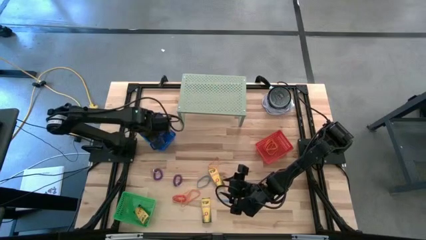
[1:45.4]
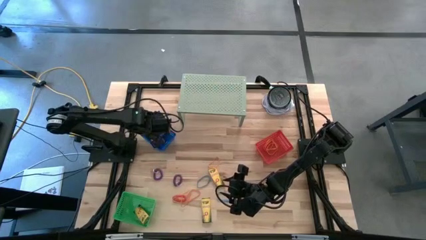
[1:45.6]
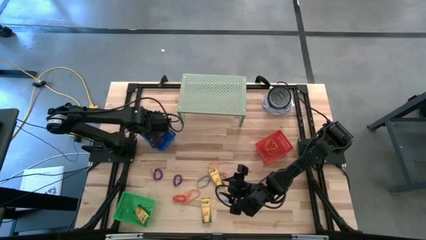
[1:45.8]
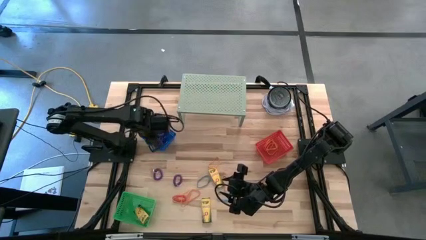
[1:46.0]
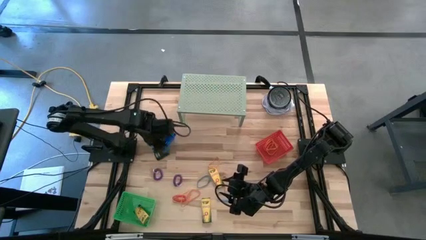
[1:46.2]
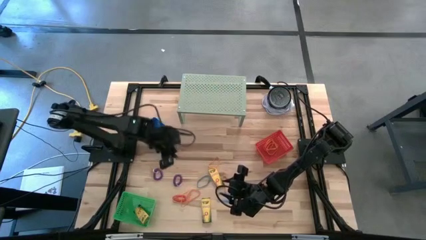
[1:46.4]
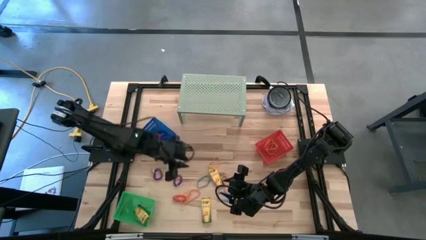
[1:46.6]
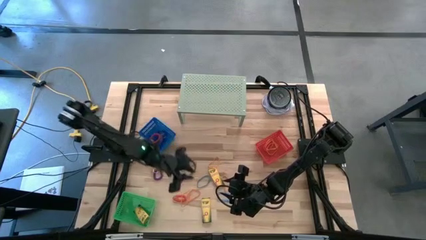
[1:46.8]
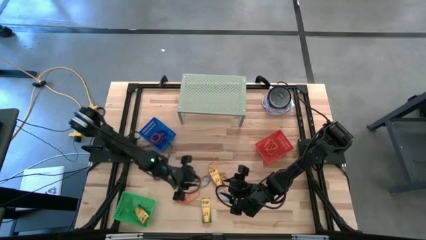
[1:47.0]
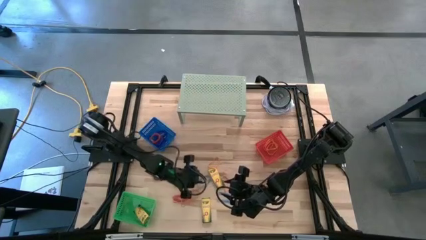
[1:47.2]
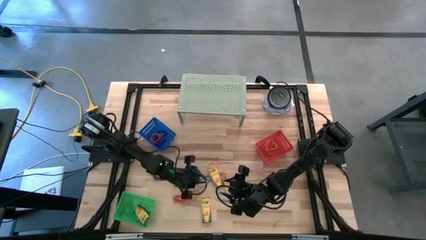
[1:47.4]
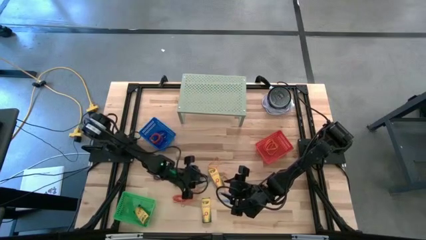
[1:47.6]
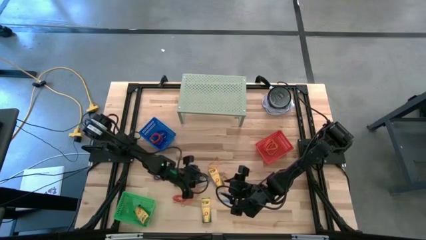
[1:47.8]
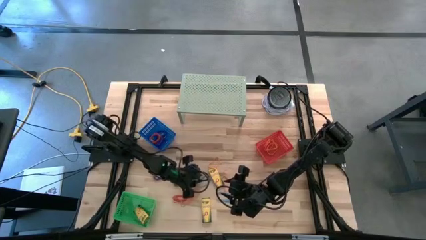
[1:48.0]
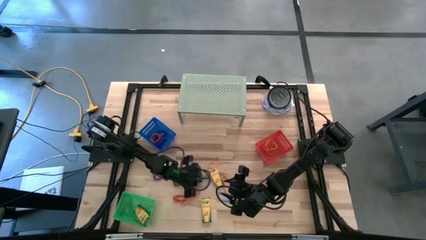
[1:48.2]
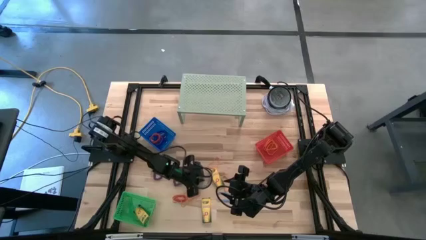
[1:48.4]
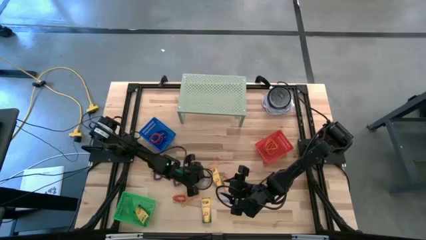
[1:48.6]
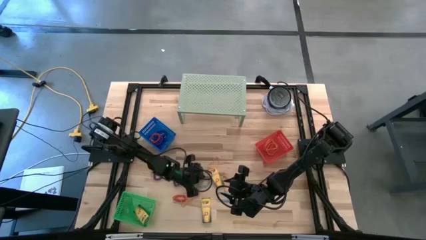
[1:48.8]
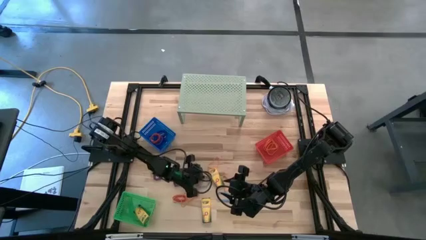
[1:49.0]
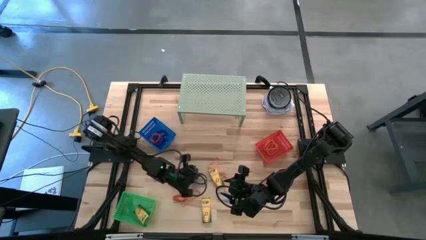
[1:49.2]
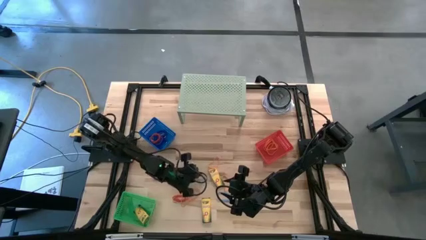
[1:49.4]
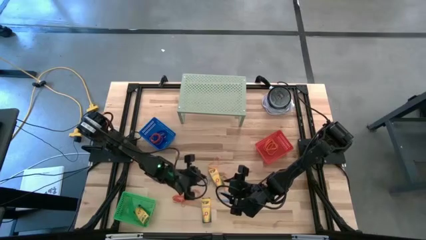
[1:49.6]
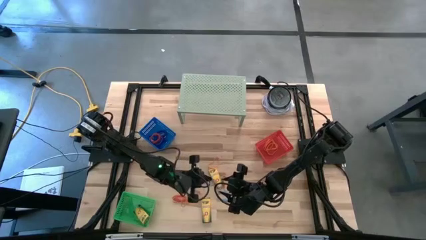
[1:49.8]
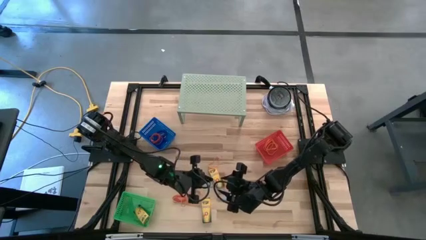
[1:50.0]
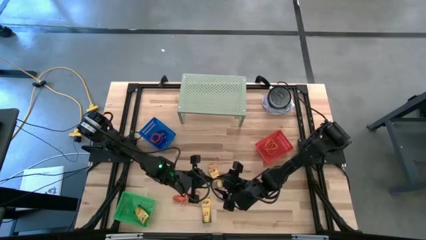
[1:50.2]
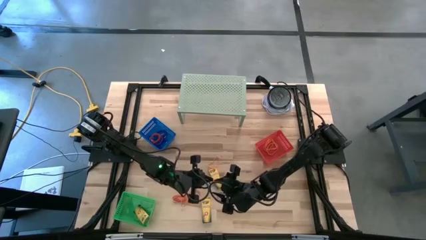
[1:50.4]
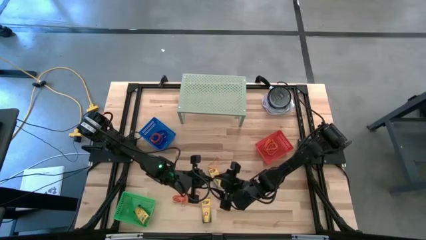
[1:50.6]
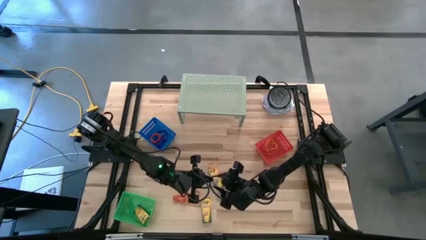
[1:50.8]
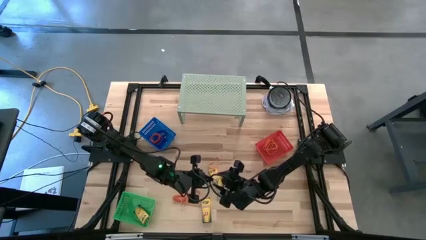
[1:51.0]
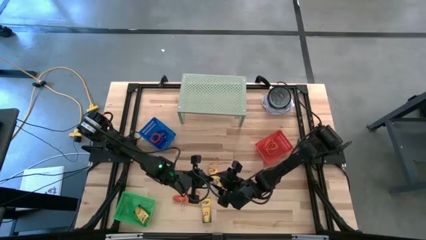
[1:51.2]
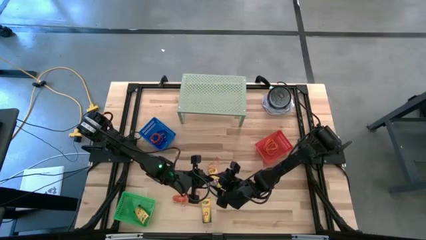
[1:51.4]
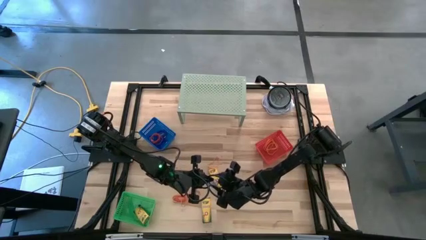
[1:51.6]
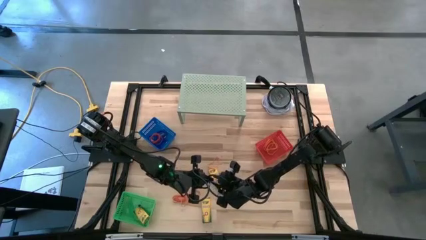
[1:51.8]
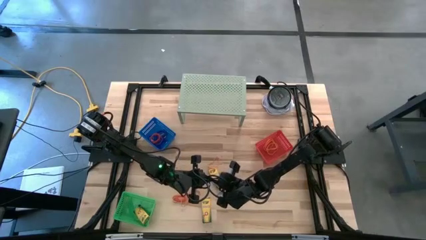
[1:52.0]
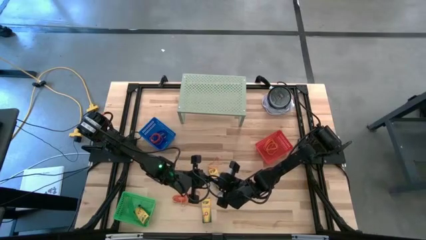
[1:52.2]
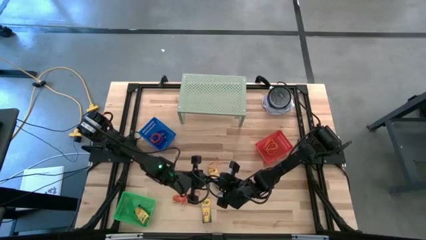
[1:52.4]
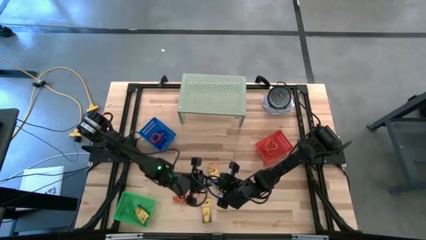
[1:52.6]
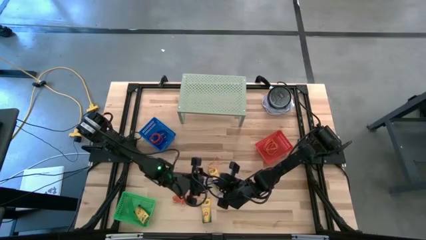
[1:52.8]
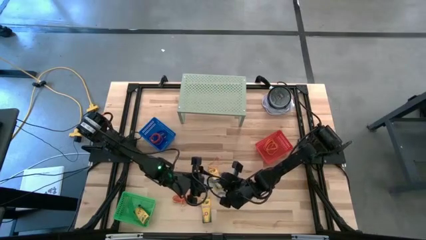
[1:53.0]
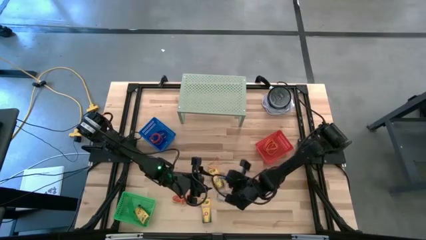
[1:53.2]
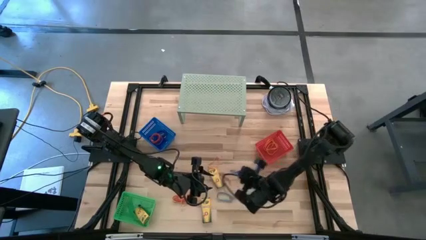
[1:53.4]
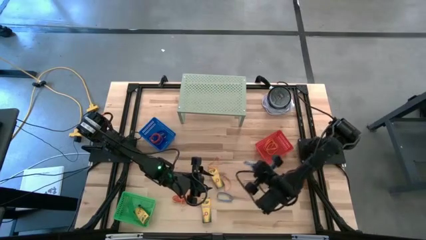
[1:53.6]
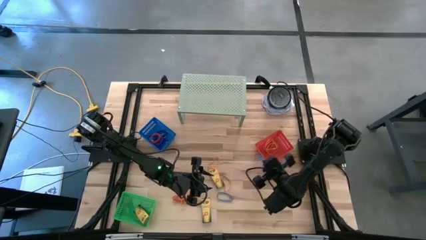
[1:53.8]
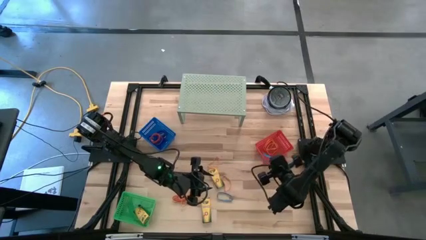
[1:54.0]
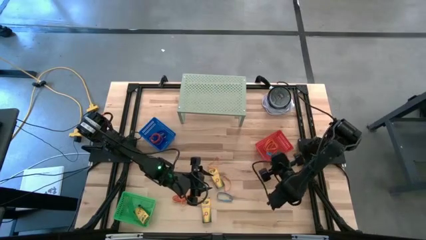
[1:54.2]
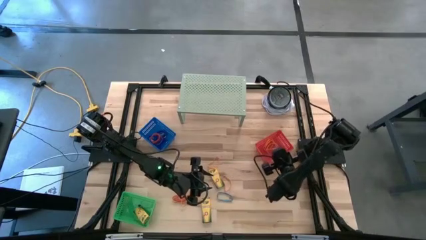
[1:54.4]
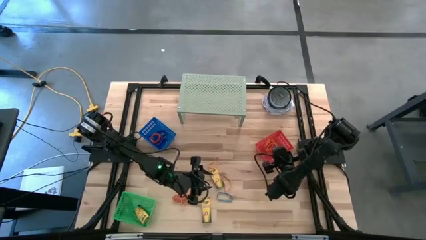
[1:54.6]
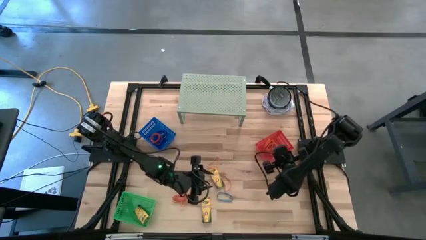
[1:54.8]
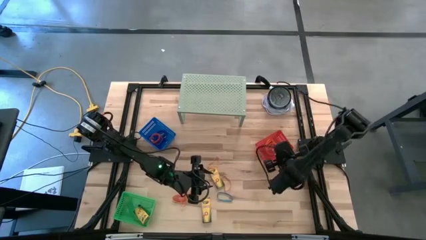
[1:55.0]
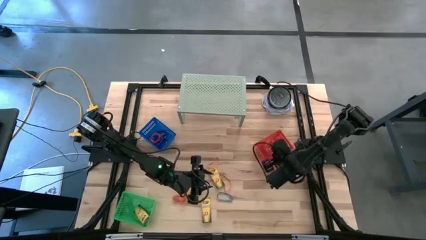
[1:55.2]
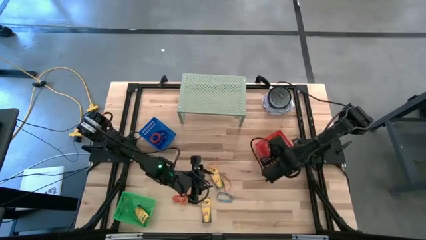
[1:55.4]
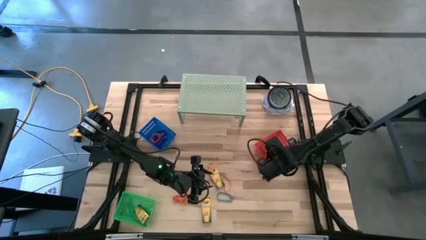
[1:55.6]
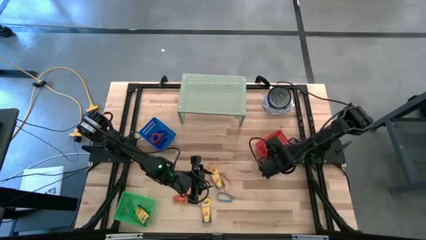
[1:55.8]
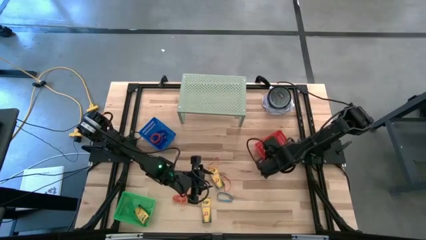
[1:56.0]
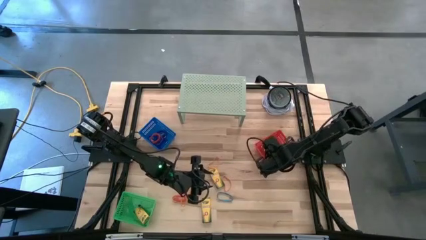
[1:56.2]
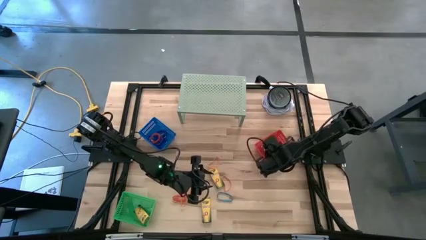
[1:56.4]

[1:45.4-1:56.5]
Task: Pick & Place Office Desk Supplies
Put the blue rubberband into the red bin

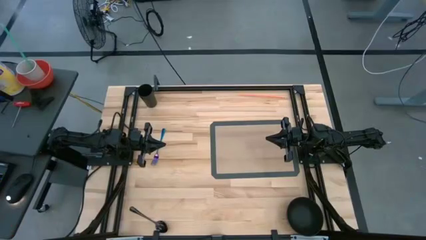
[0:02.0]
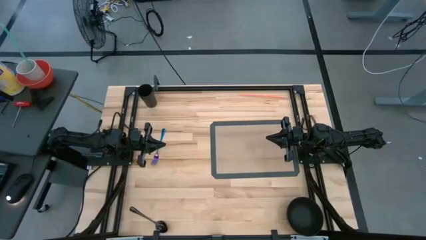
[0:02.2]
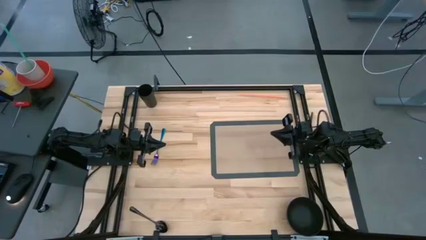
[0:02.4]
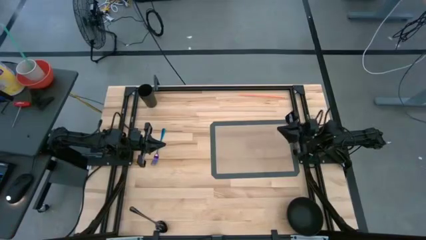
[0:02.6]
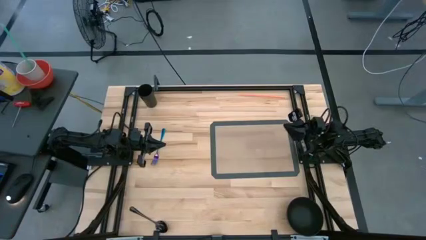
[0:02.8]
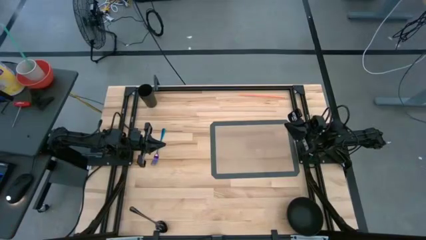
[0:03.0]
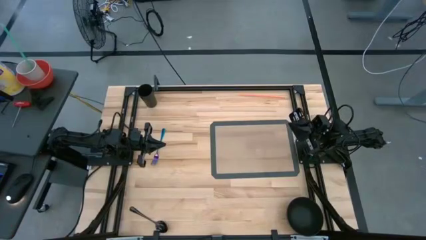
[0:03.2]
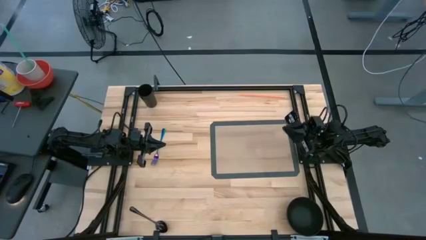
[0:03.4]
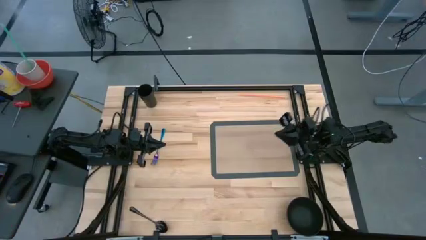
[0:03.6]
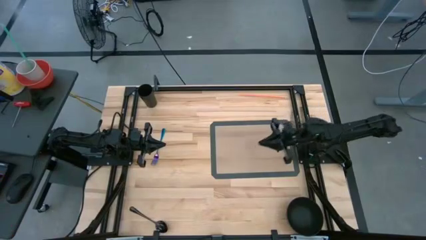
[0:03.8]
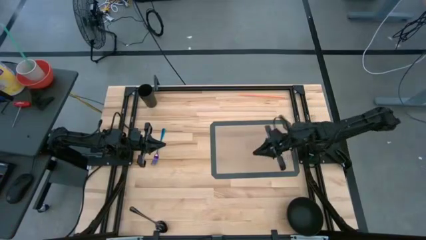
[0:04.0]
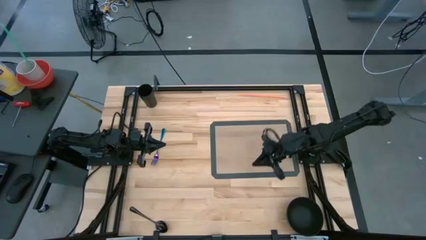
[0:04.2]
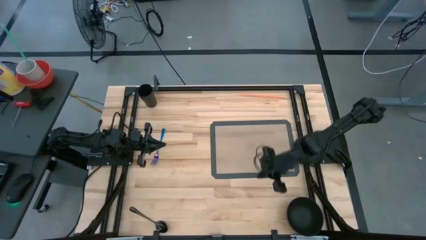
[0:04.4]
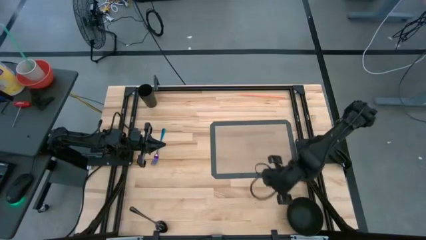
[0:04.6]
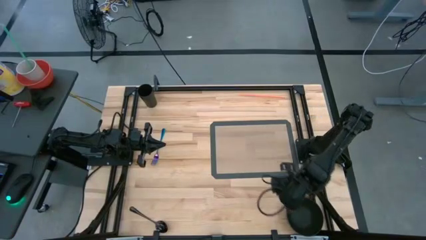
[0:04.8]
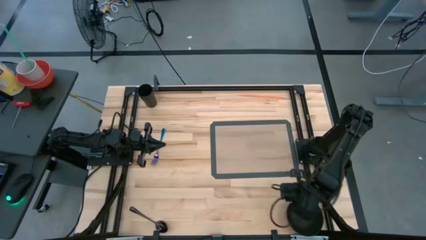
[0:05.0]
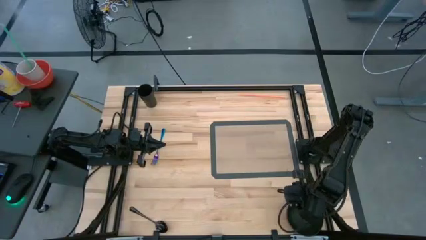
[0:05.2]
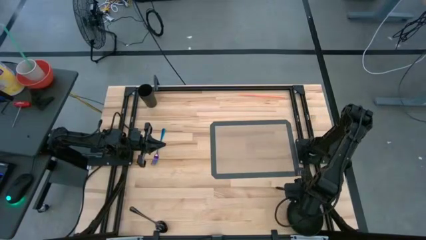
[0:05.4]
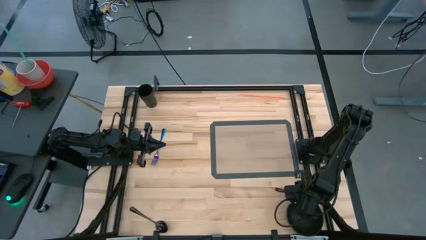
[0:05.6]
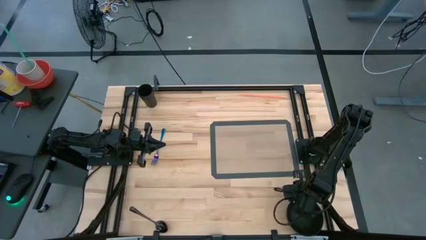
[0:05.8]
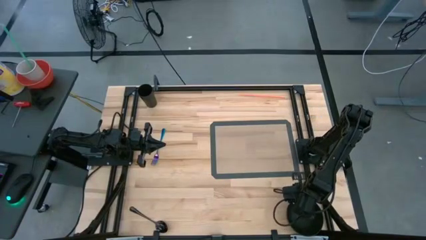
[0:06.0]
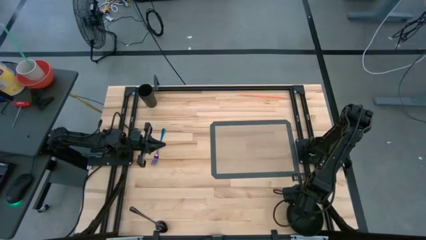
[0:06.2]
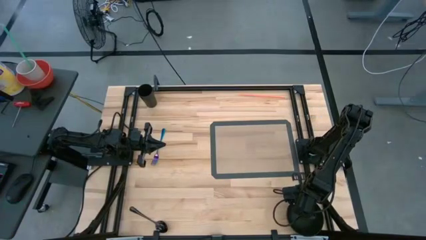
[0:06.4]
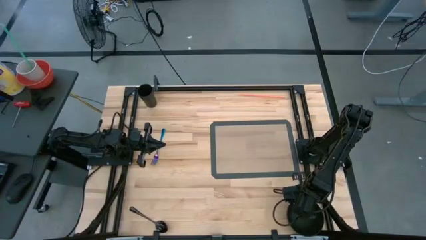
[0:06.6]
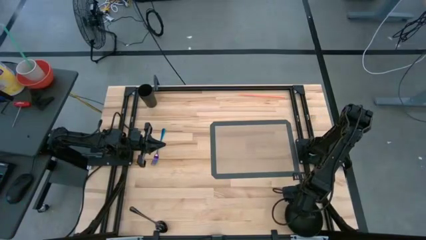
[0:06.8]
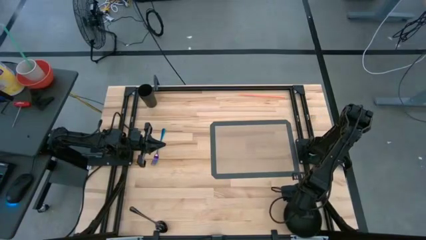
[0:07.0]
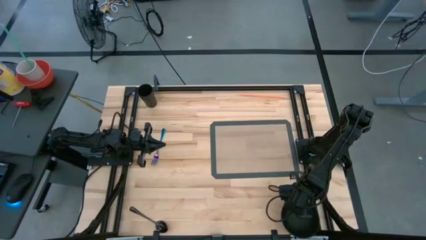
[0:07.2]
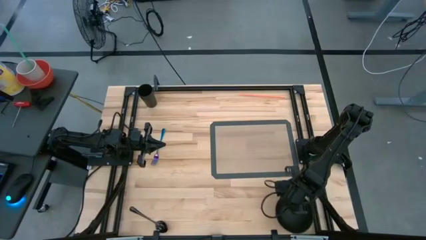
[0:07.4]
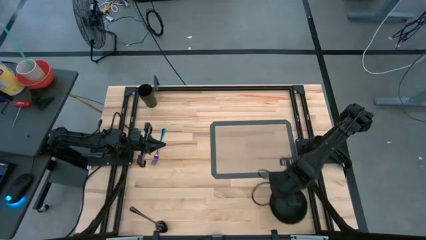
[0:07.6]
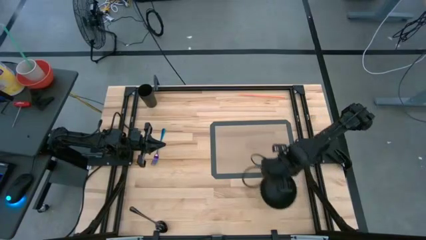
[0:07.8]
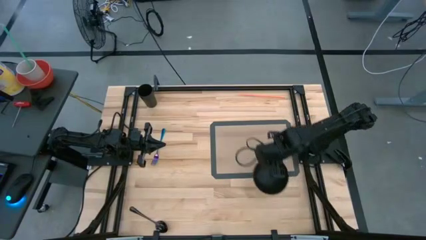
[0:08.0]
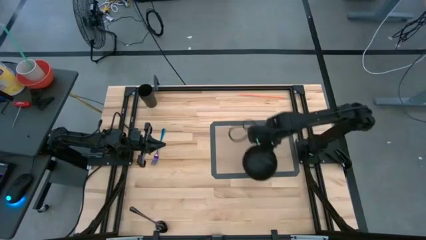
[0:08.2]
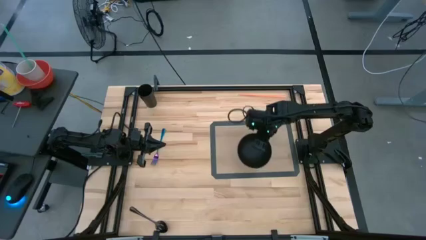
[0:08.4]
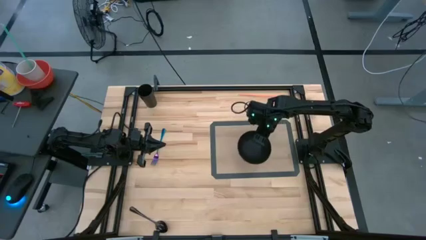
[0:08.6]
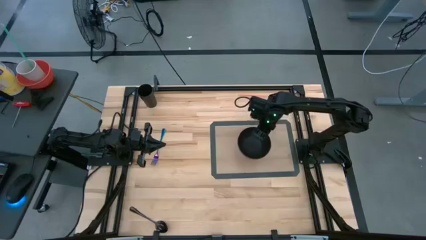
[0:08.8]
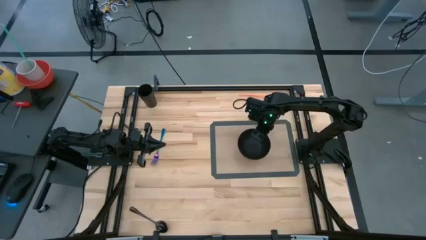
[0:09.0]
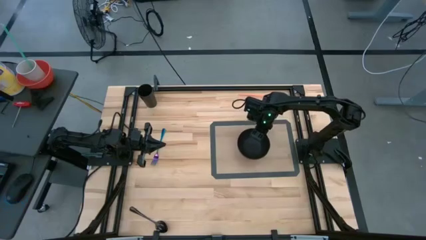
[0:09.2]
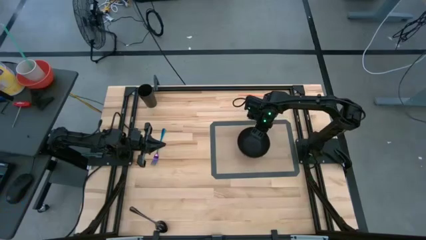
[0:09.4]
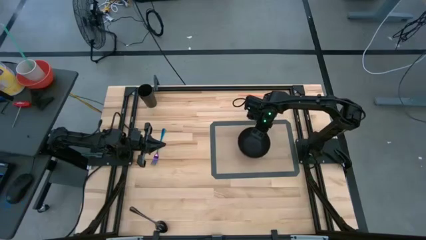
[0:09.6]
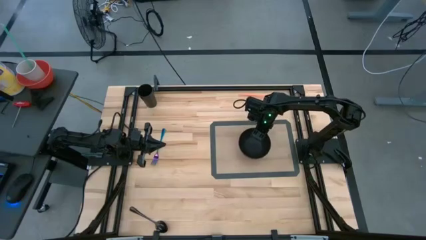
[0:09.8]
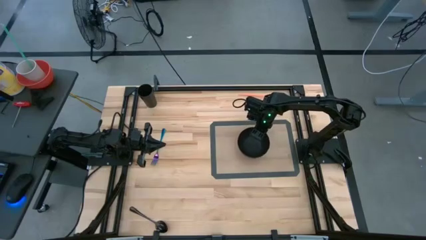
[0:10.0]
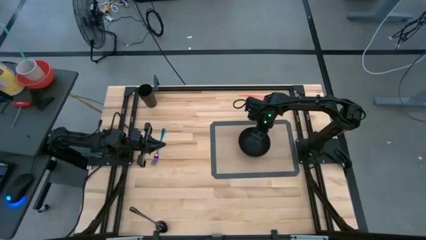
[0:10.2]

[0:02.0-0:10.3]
Task: Pick & Place Utensil
Put the black bowl on the gray mat
